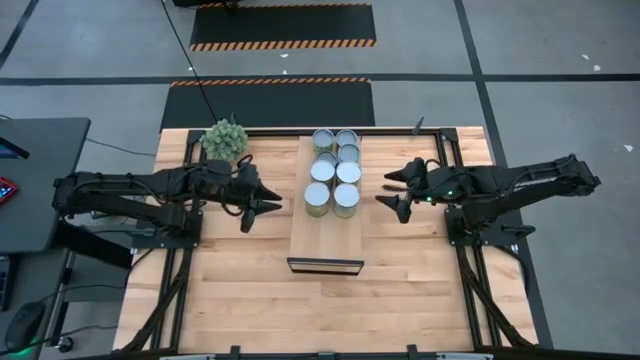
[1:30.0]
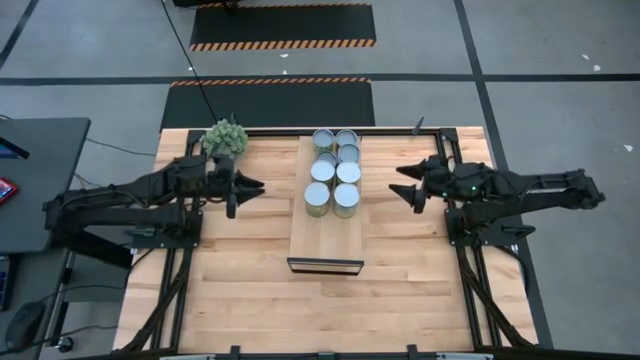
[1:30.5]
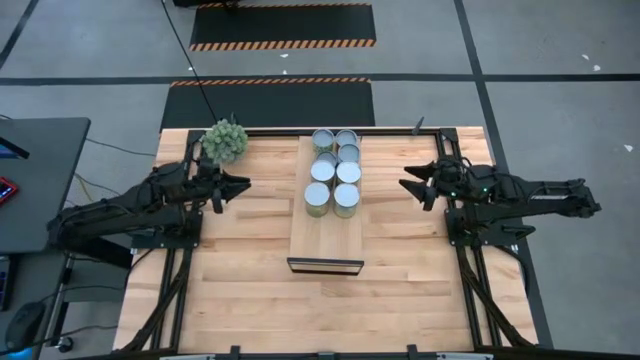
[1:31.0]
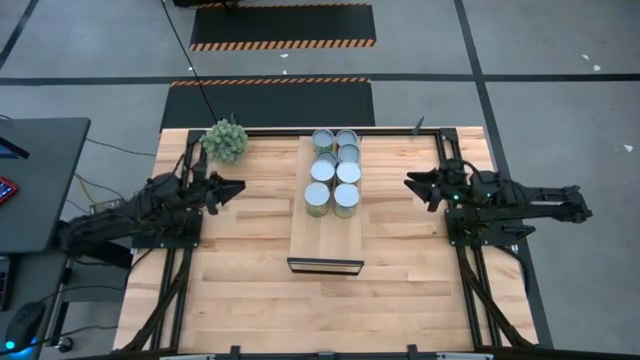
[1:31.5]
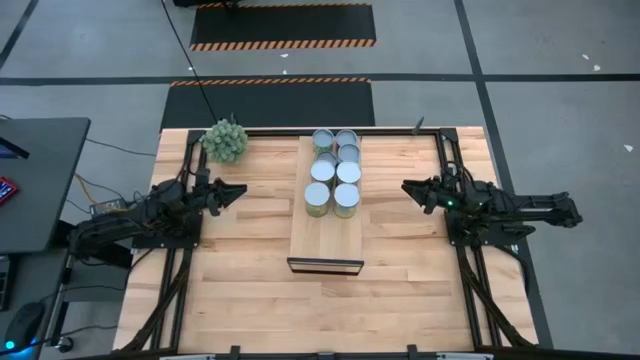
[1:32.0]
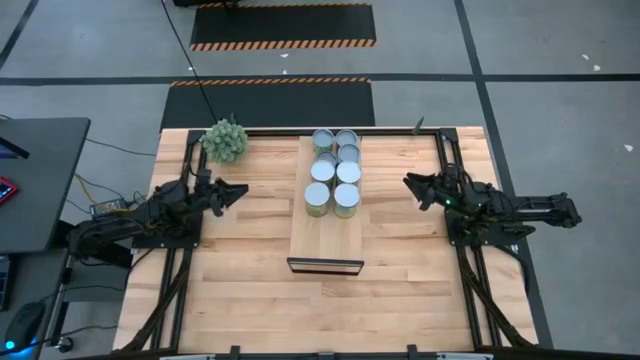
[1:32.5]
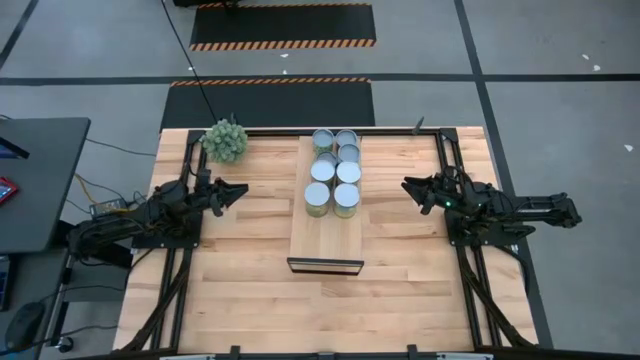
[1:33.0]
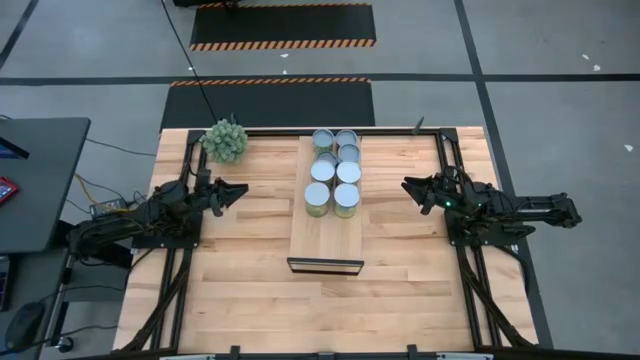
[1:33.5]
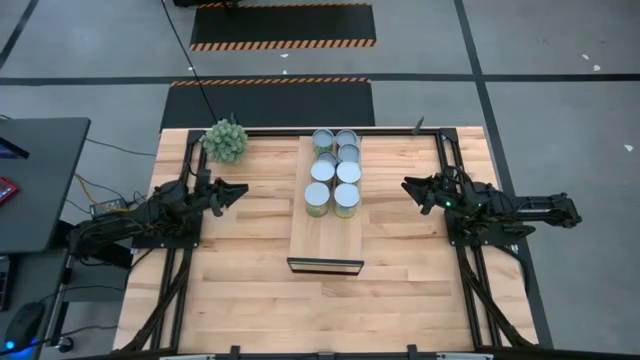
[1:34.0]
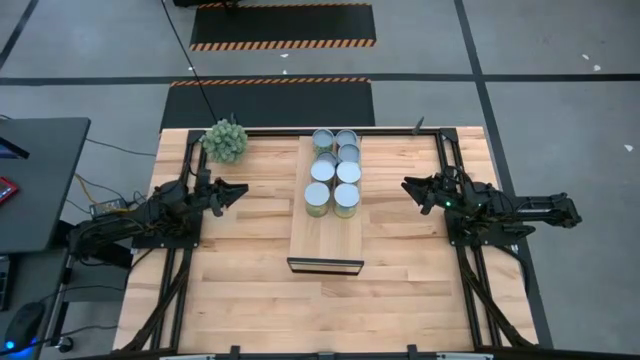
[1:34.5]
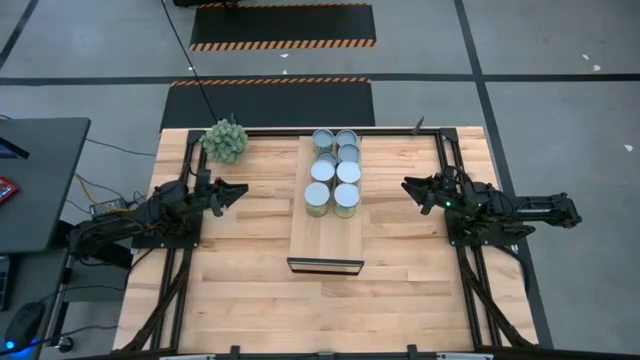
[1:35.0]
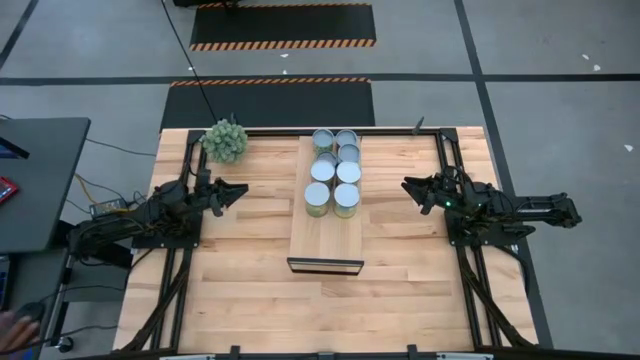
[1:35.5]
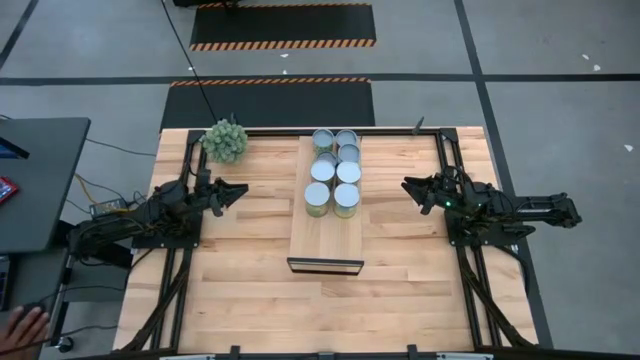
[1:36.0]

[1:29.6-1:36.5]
Task: Pick and place cans onto a shelf
Return to Home Position

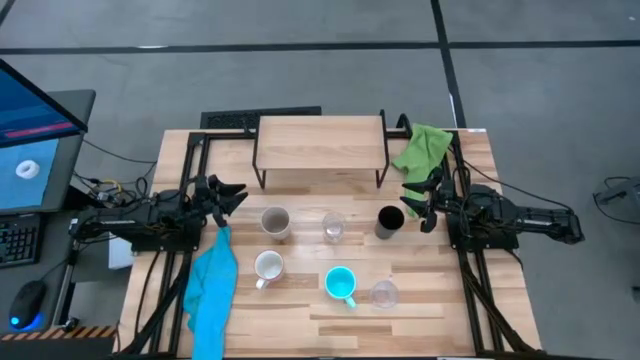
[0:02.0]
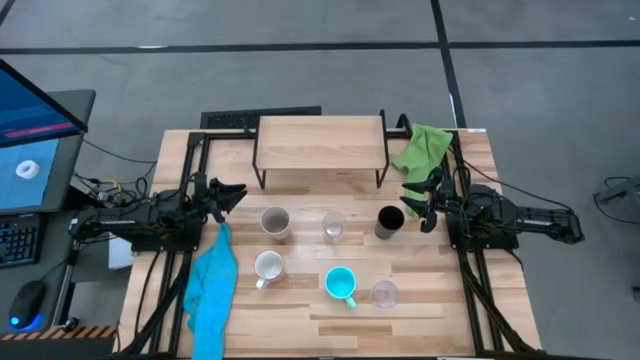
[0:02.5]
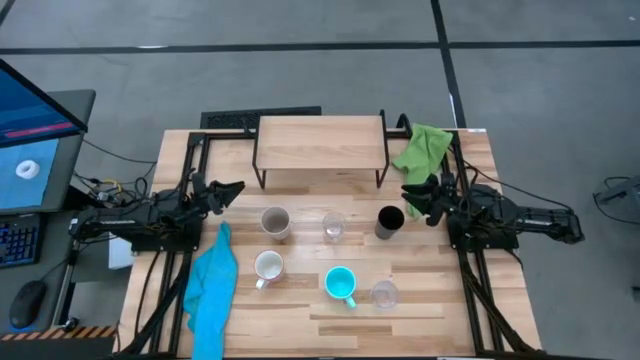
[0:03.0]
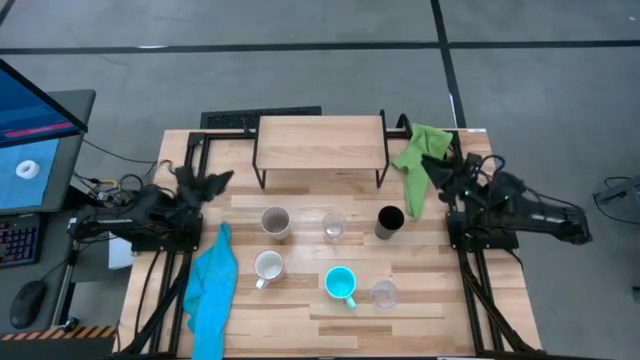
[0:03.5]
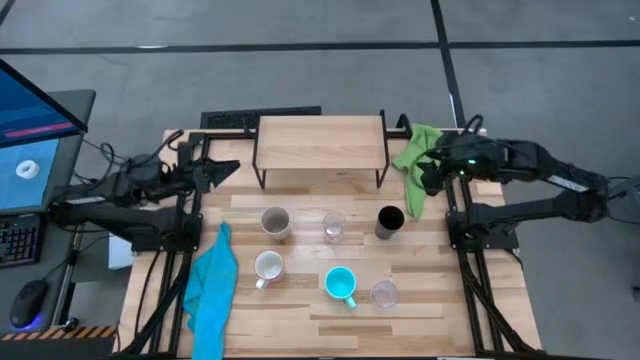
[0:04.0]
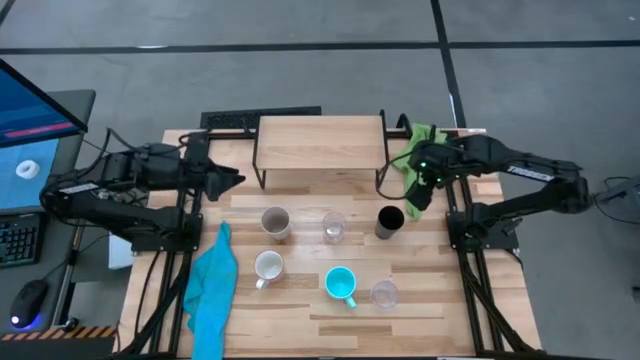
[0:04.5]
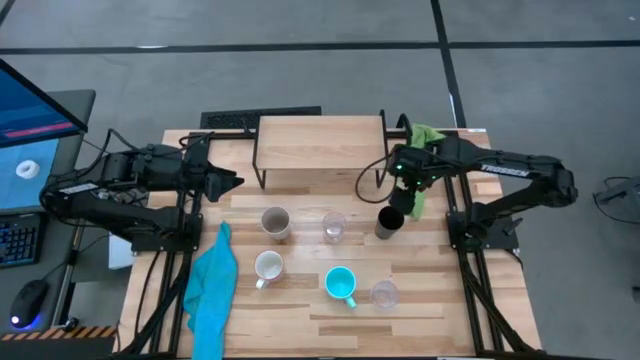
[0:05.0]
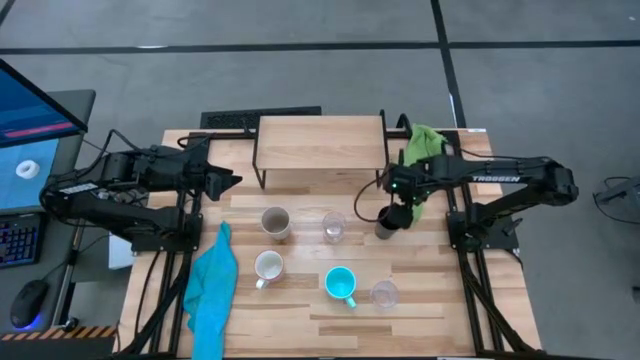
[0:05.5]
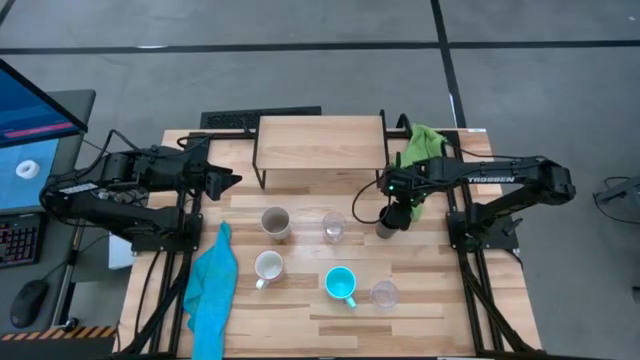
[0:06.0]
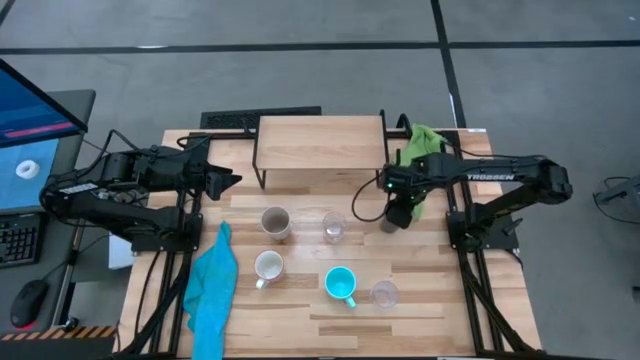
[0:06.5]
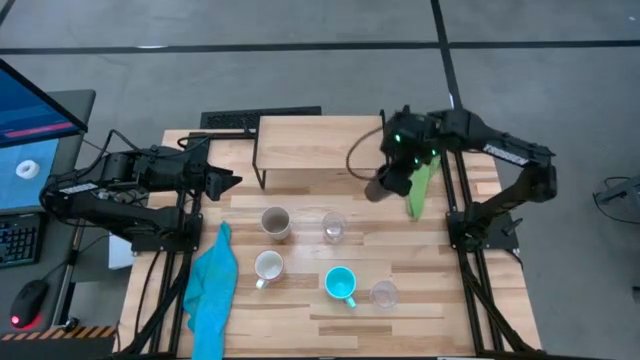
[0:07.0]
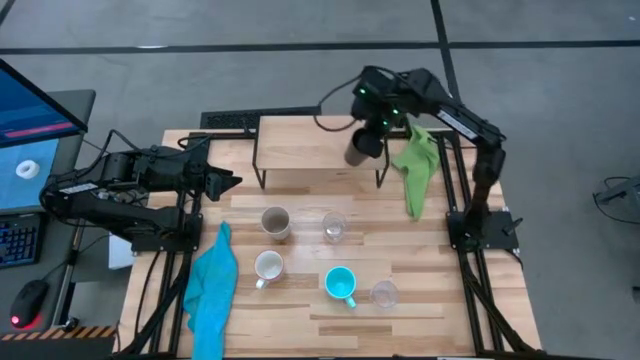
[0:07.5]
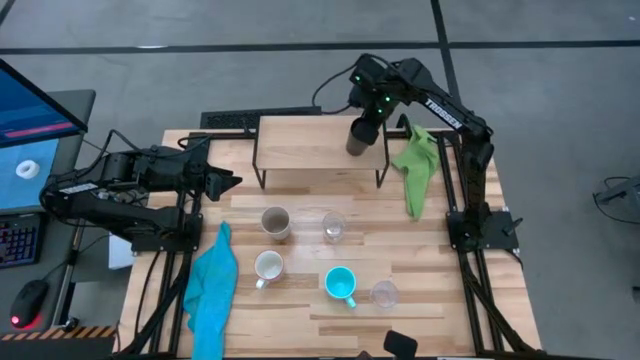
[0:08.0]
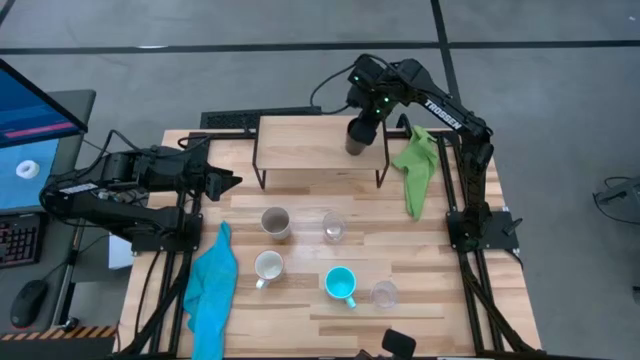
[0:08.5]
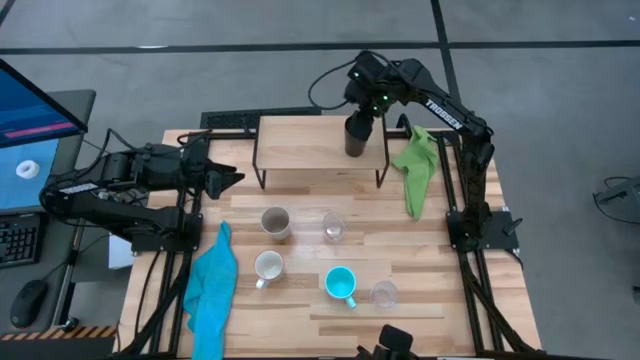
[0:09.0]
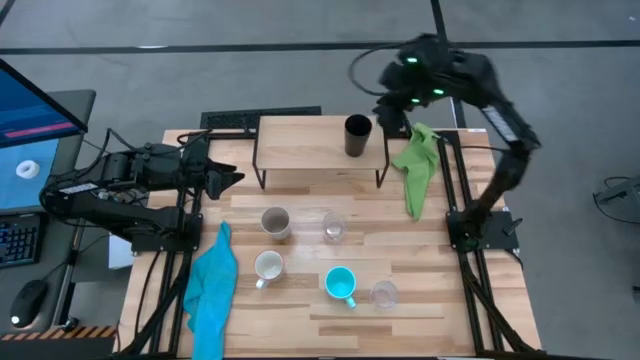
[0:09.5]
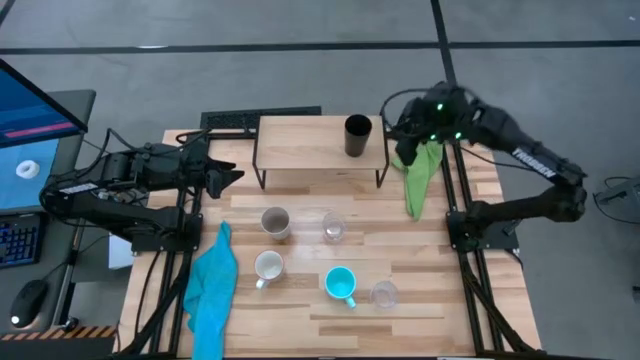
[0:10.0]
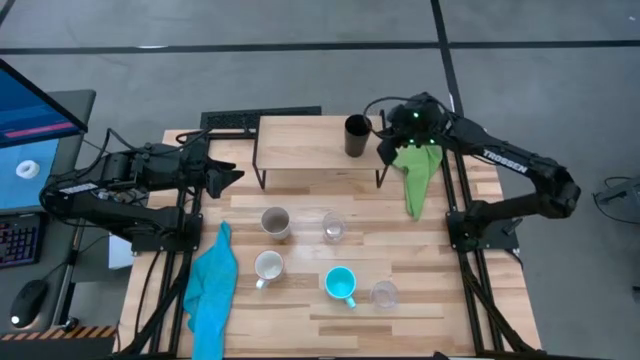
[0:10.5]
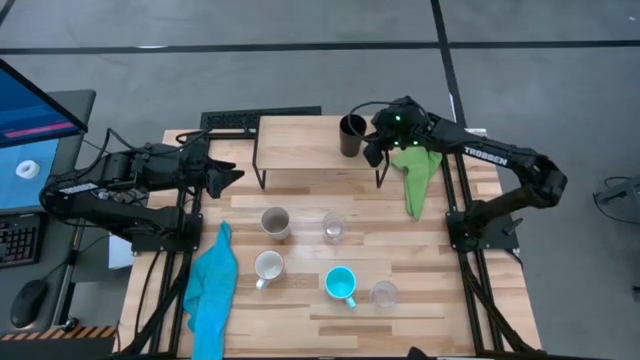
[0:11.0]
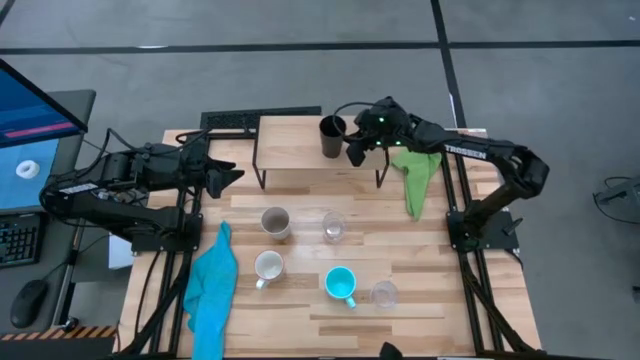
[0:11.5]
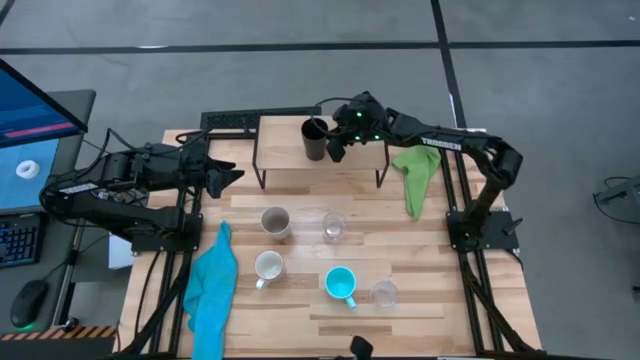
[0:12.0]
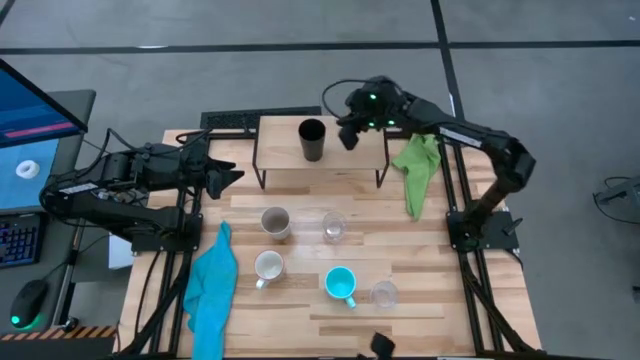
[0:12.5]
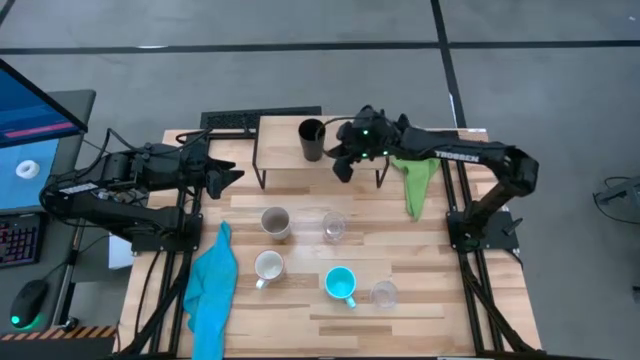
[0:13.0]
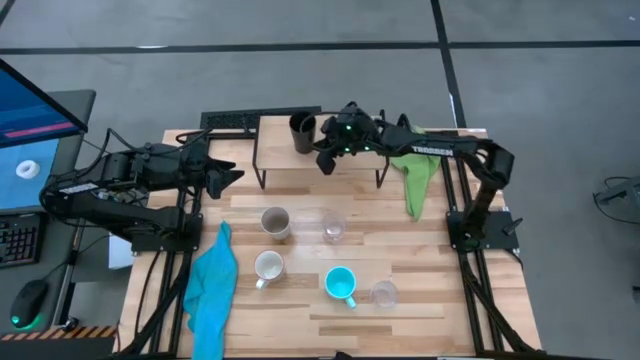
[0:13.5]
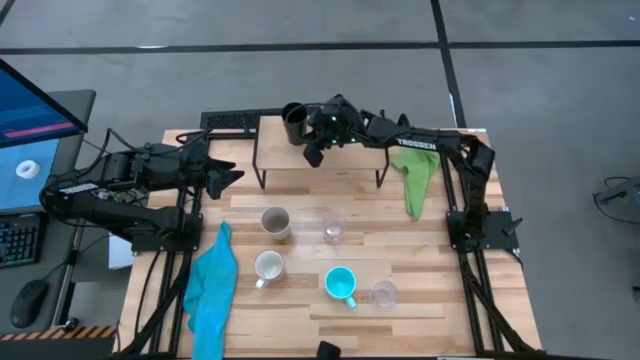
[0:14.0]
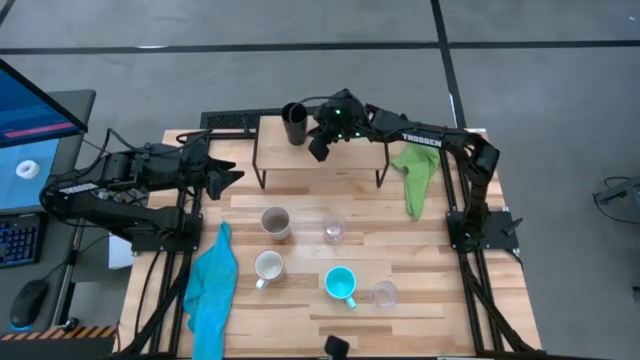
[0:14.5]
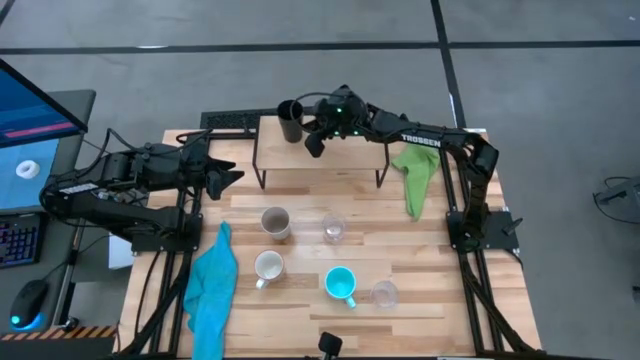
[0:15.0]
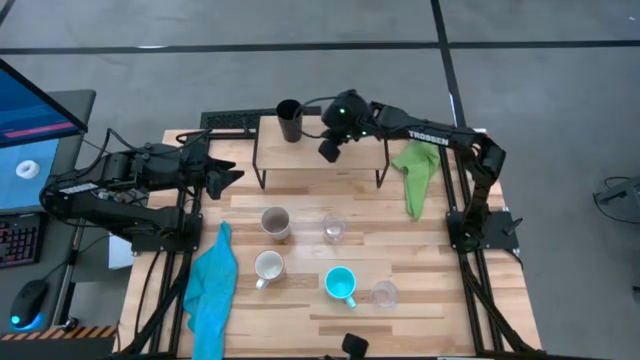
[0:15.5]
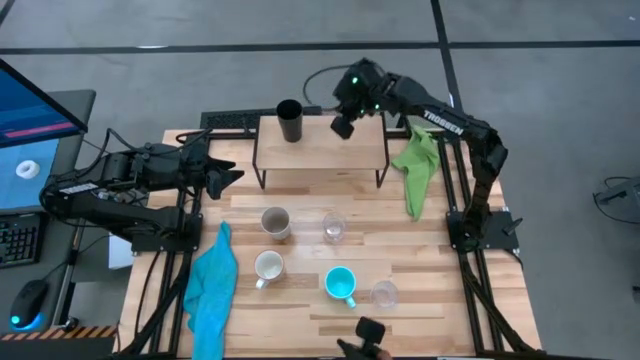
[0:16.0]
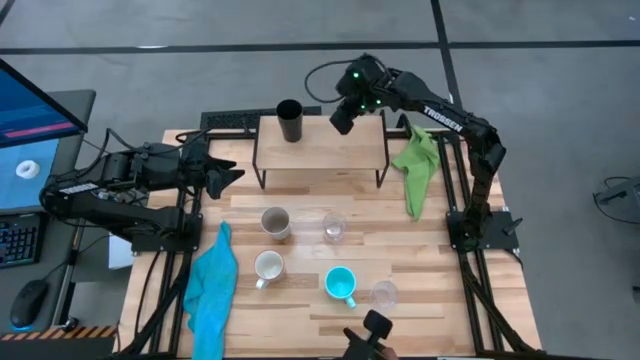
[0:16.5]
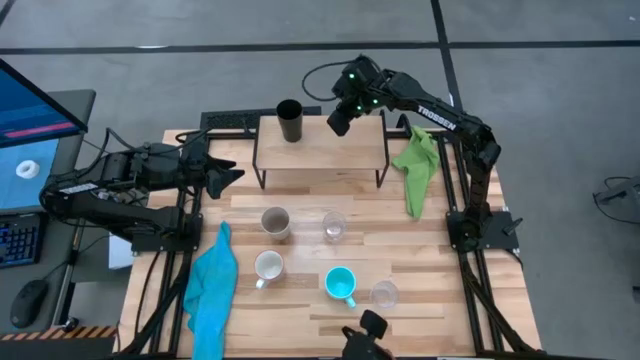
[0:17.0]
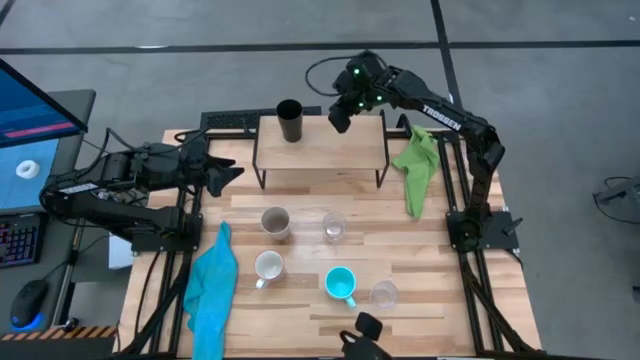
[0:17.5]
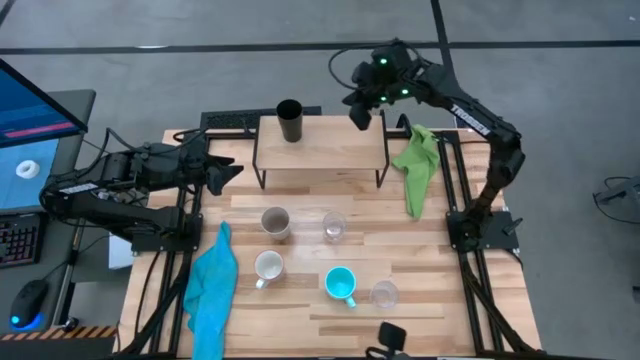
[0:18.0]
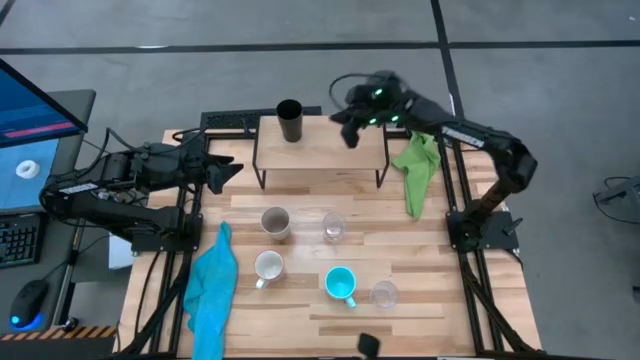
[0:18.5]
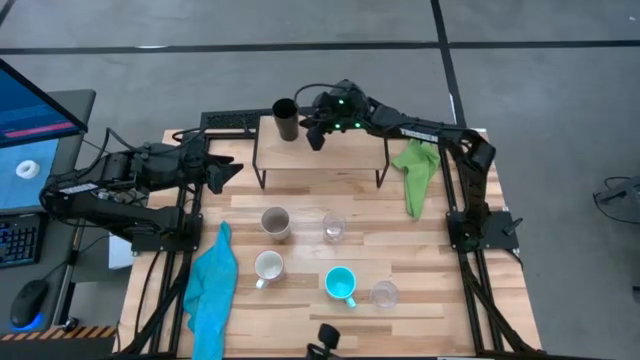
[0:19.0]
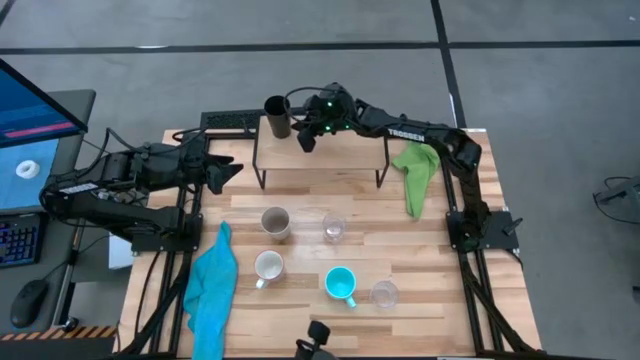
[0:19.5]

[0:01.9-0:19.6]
Task: Stack small to large cups/mugs on shelf
Put the black cup on the shelf
